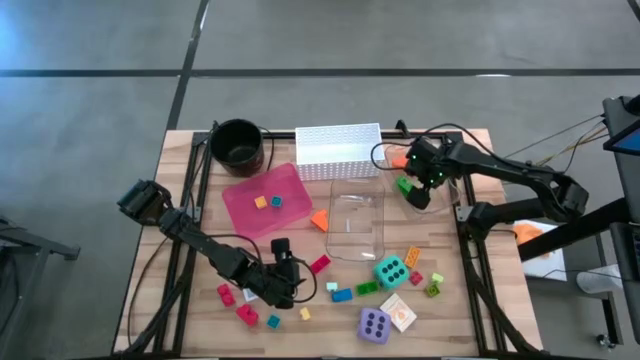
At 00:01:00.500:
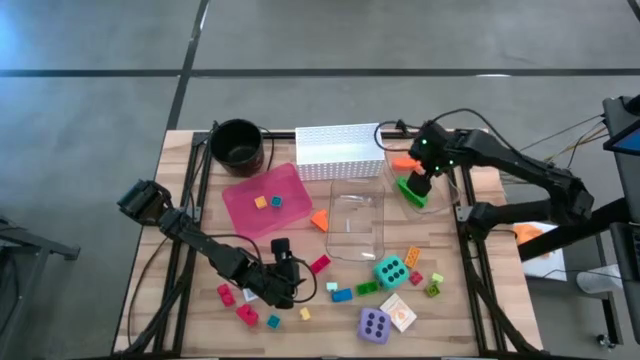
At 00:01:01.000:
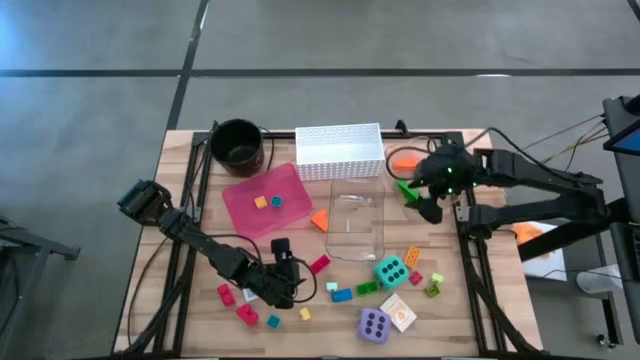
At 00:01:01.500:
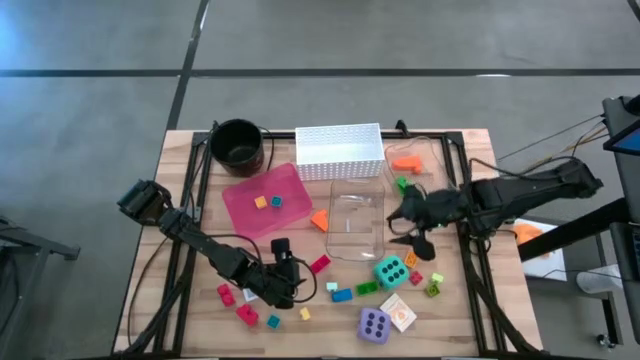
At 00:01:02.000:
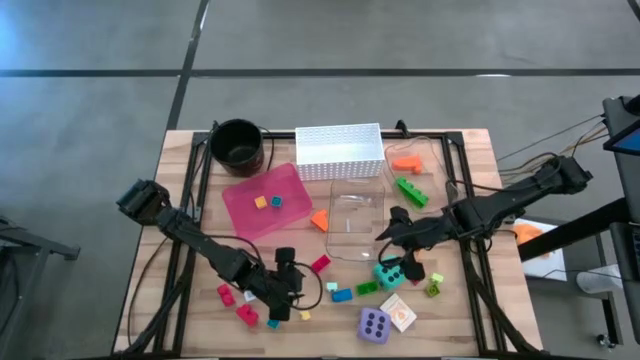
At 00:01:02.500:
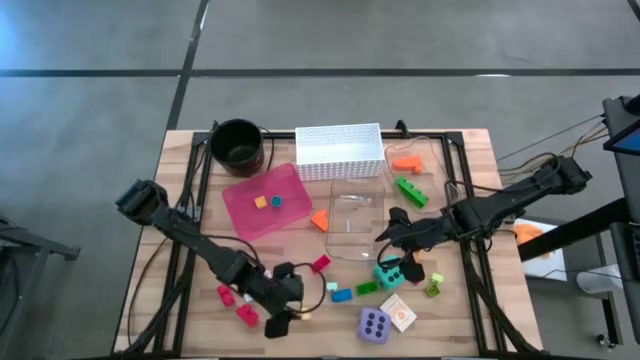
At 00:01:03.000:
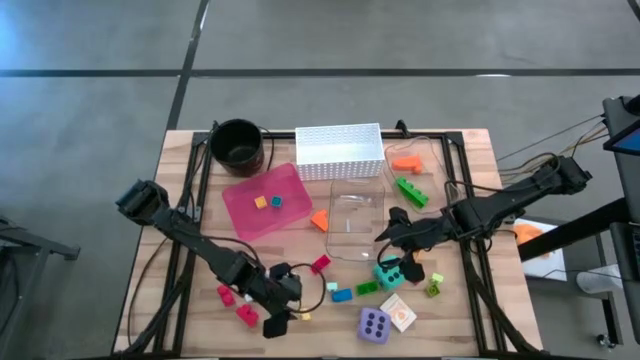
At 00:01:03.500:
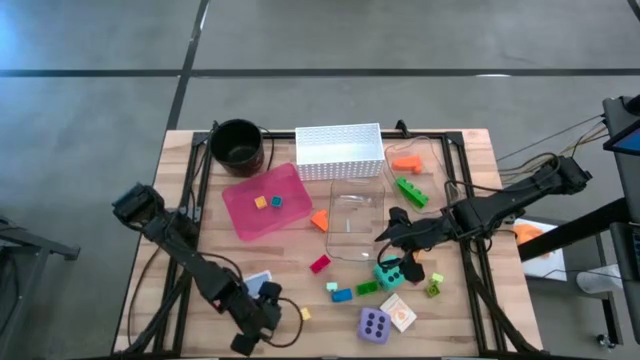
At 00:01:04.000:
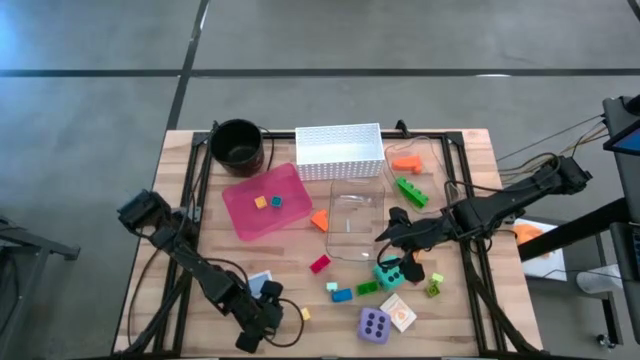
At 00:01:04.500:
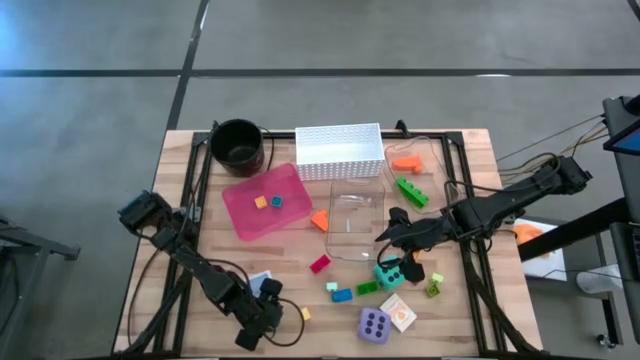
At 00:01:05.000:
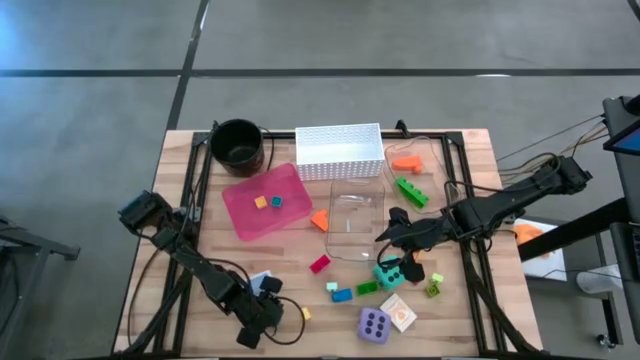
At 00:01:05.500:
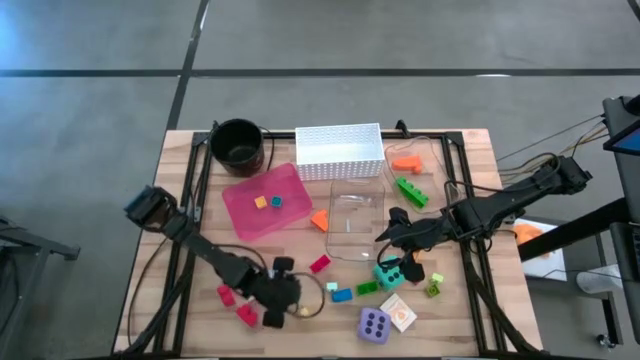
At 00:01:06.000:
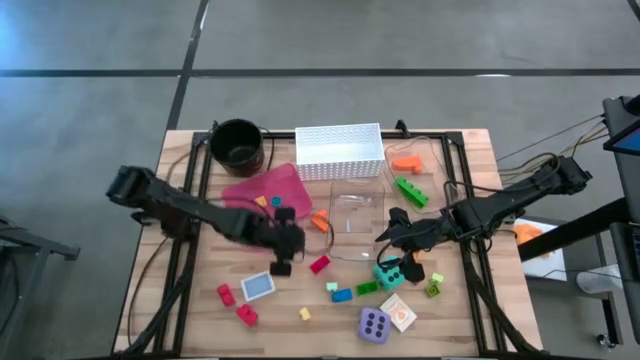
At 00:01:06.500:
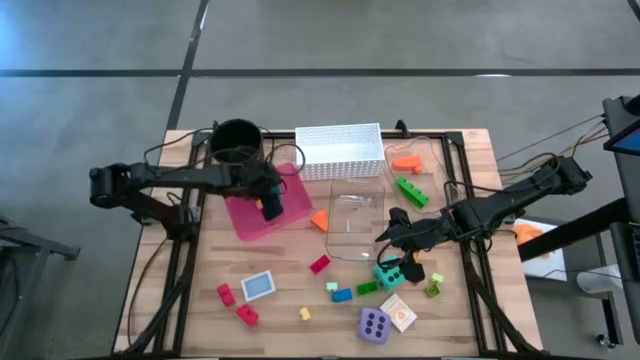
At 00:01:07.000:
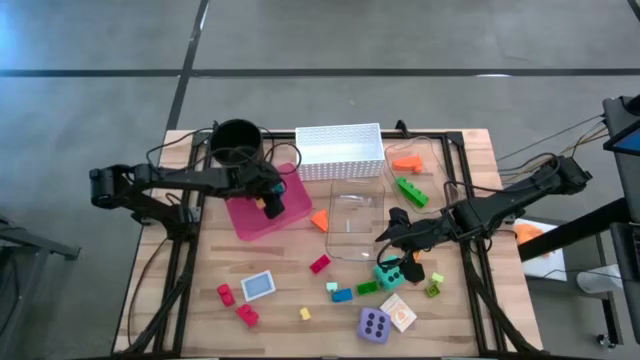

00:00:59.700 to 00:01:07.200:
Task: Pick & Place Toys
Put the small blue game piece into the red bin

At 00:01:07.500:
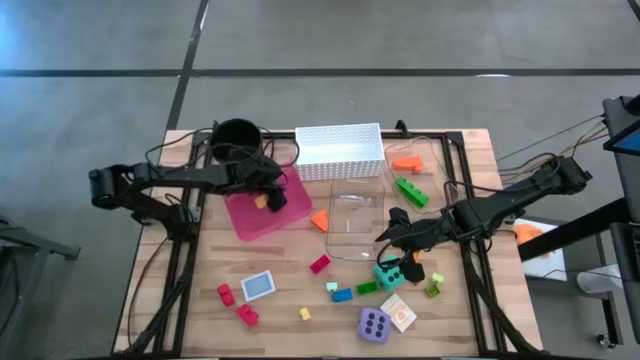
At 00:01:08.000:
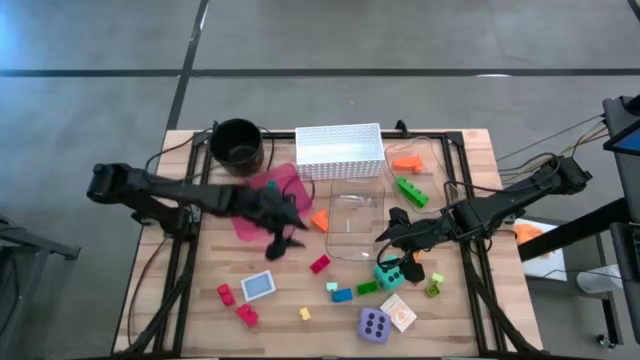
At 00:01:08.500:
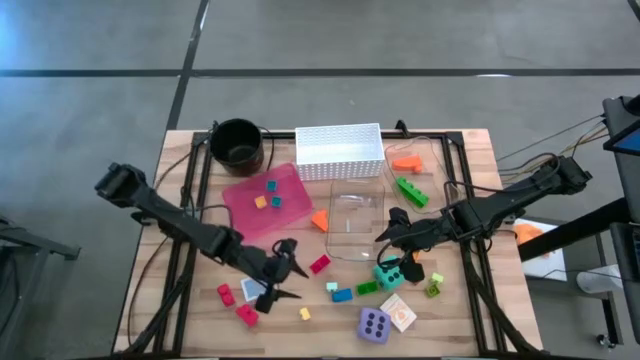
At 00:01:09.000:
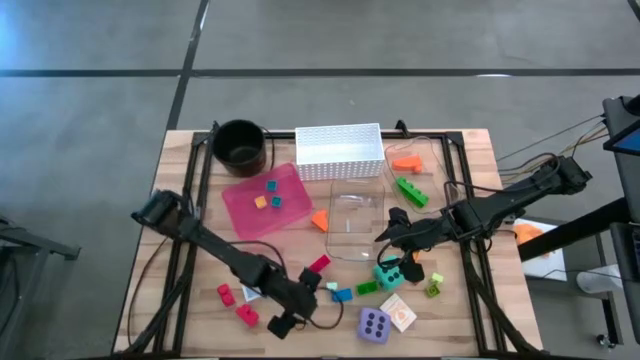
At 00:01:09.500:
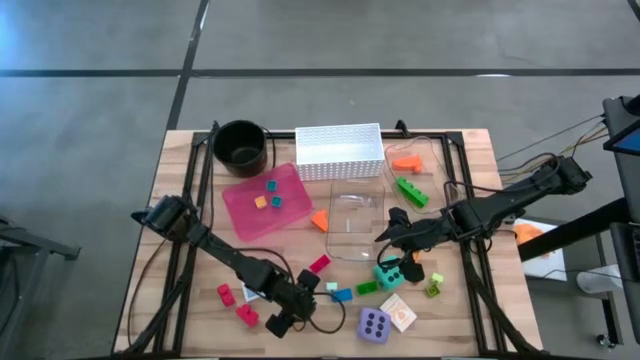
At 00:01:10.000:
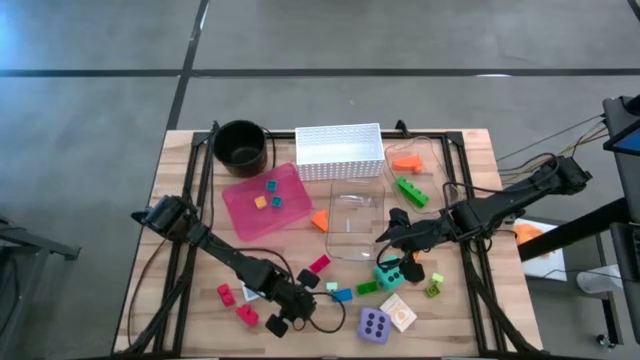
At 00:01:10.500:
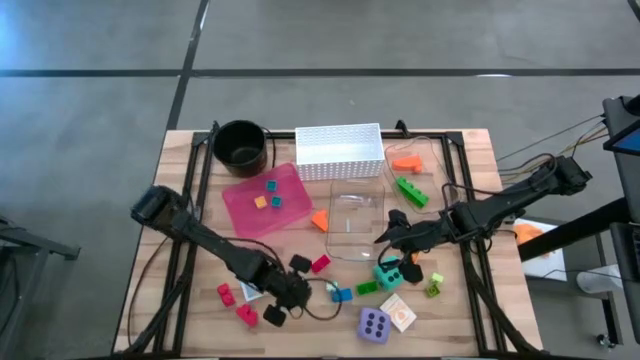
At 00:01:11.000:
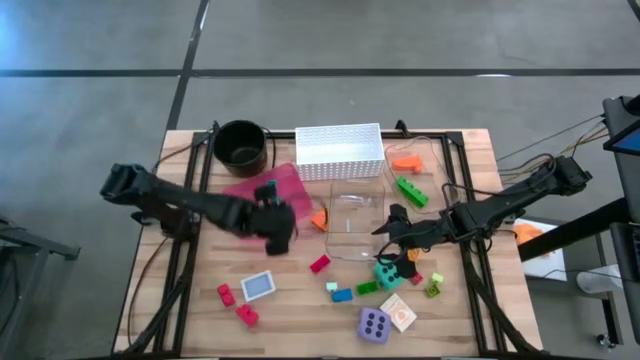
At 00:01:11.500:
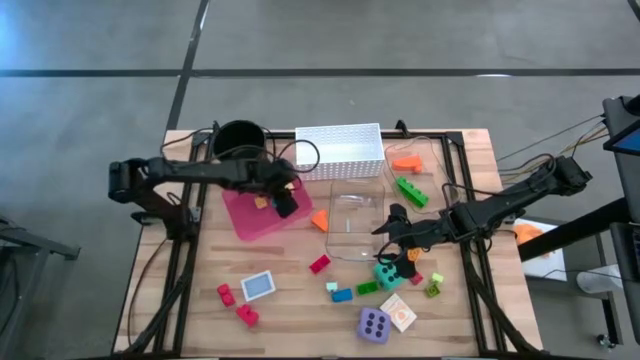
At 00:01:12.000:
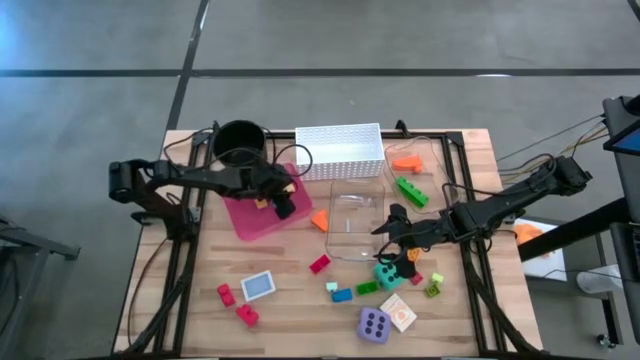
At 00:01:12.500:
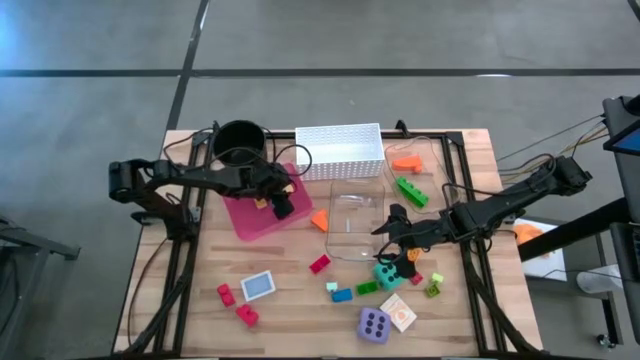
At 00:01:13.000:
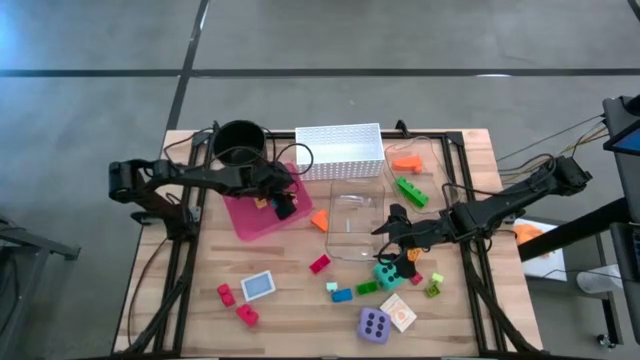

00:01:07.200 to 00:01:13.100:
Put the yellow game piece into the red bin

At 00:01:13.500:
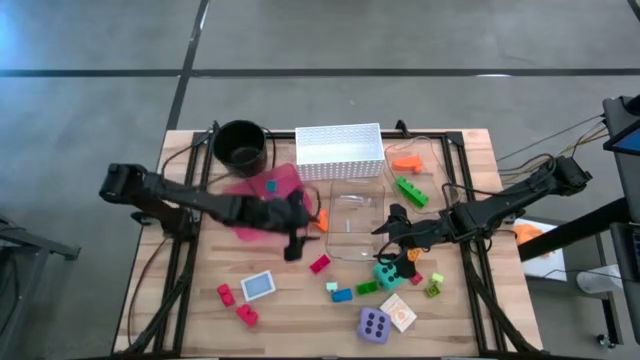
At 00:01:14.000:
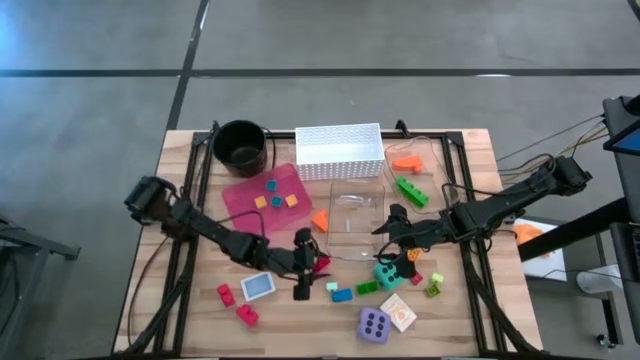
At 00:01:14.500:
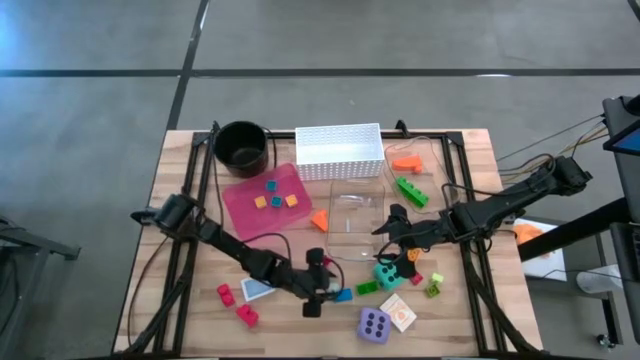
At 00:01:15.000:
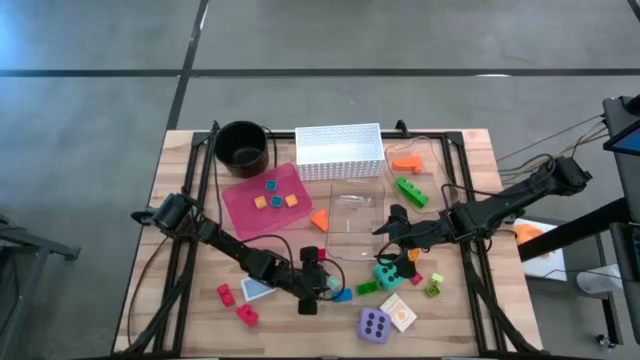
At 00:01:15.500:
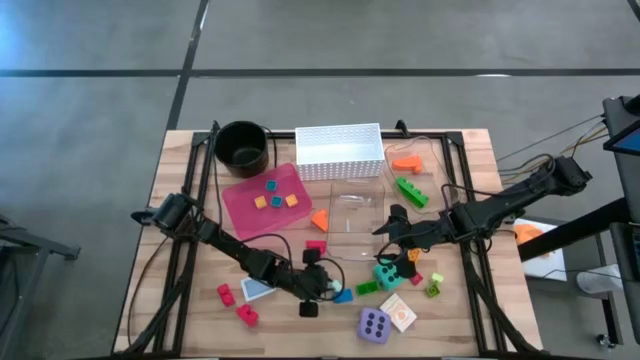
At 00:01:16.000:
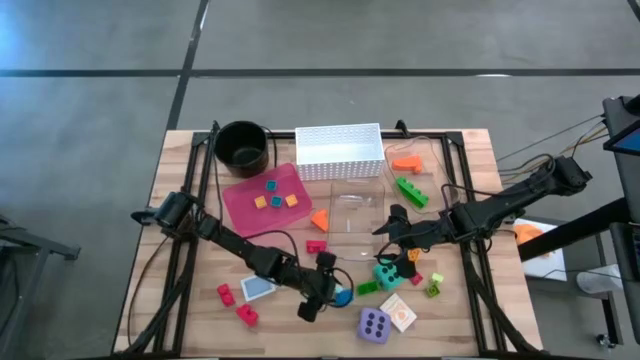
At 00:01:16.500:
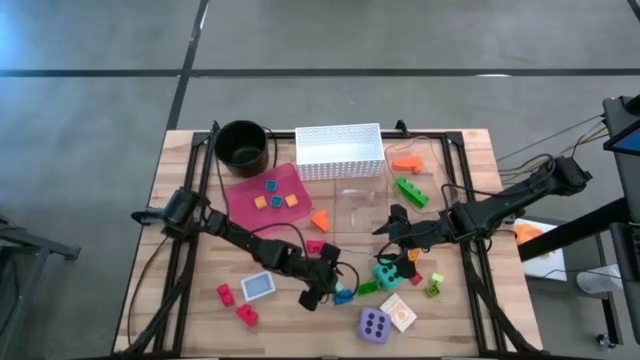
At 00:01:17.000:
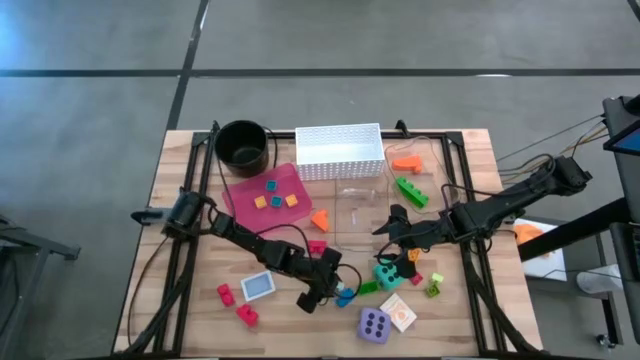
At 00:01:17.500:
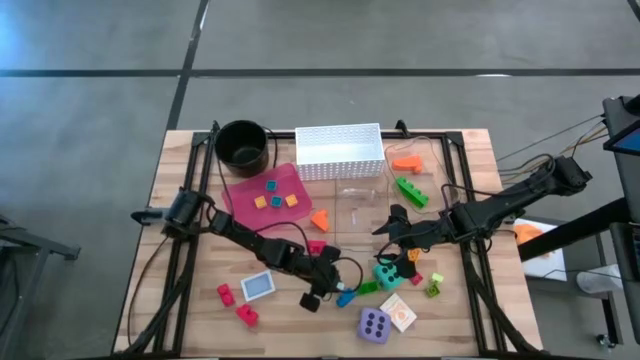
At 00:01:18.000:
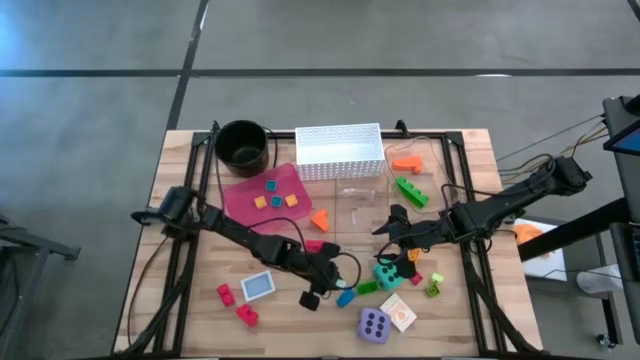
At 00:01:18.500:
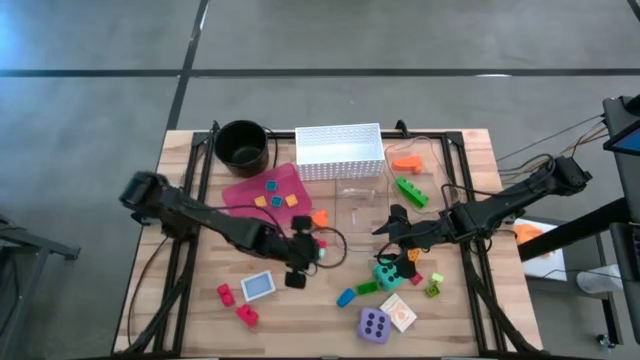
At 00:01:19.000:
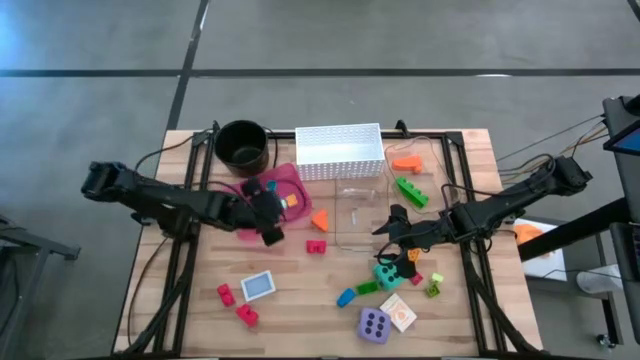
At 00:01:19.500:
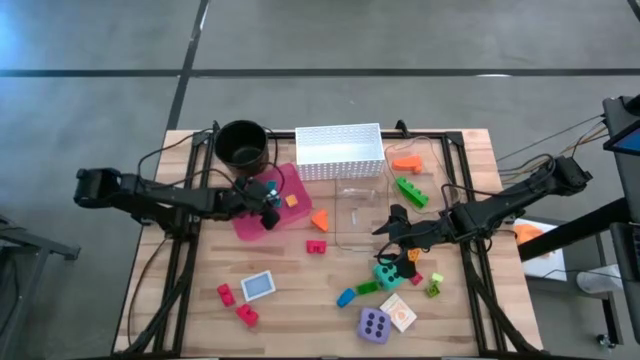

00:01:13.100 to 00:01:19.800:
Put the light blue game piece into the red bin

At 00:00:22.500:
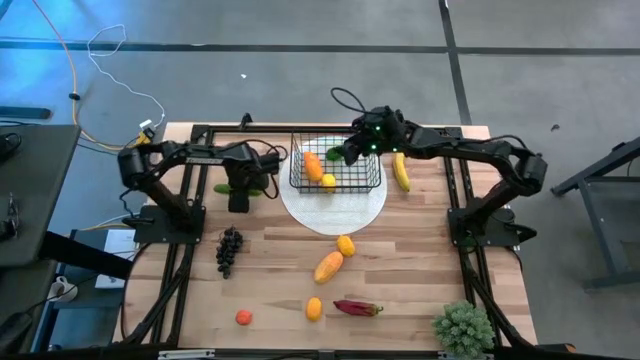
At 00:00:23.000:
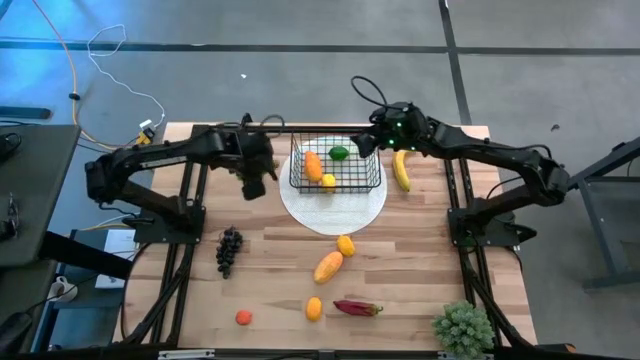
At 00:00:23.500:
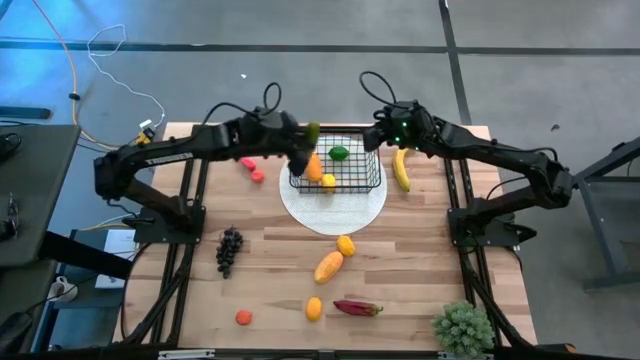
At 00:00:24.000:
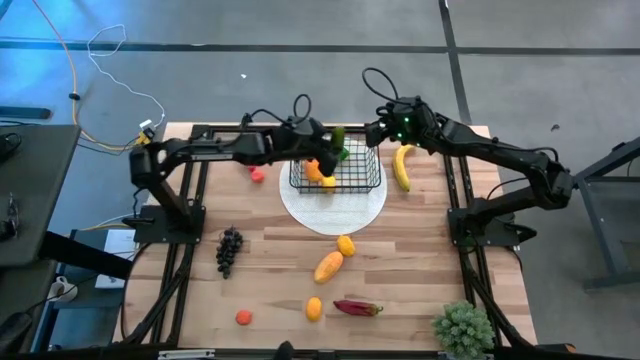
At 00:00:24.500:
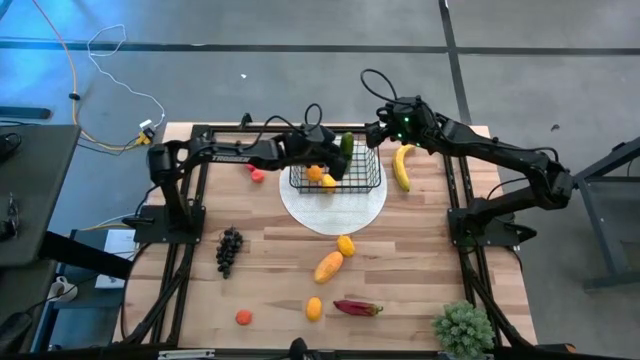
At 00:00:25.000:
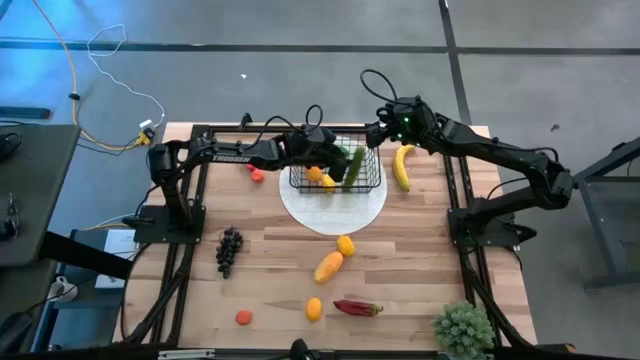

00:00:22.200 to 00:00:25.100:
Task: Build produce basket
Put the green cucumber into the black wire basket
